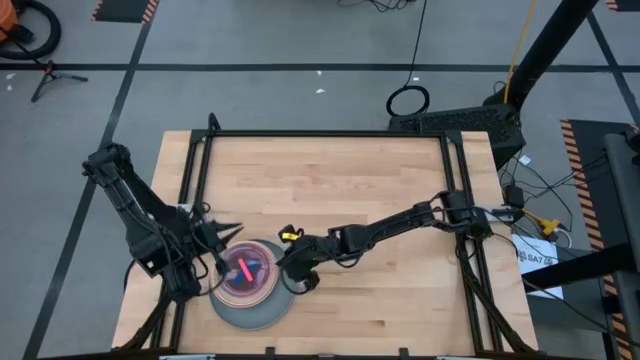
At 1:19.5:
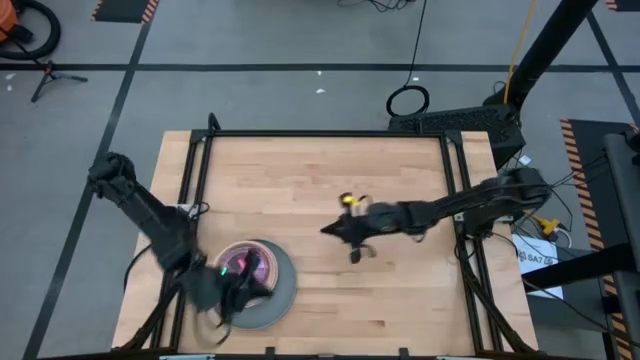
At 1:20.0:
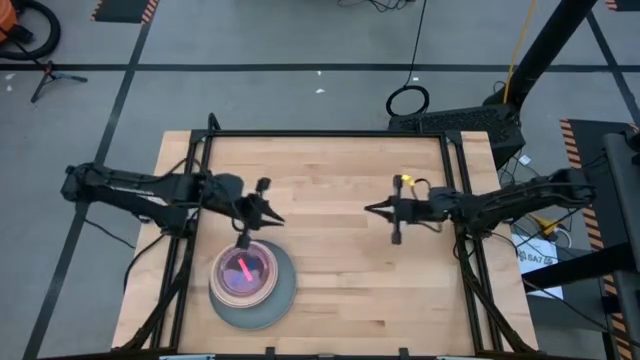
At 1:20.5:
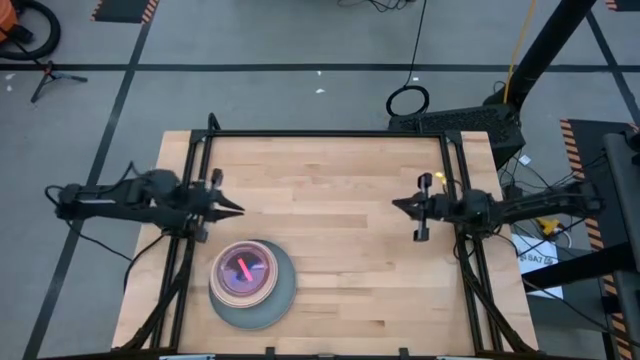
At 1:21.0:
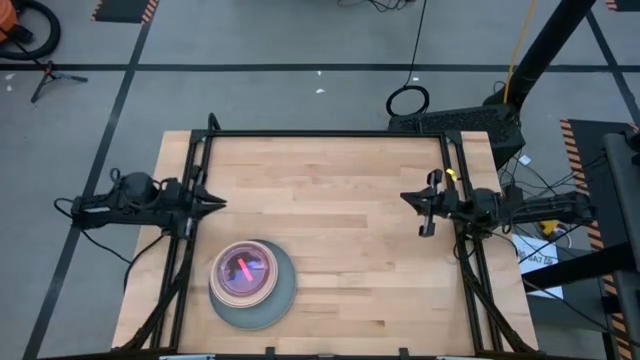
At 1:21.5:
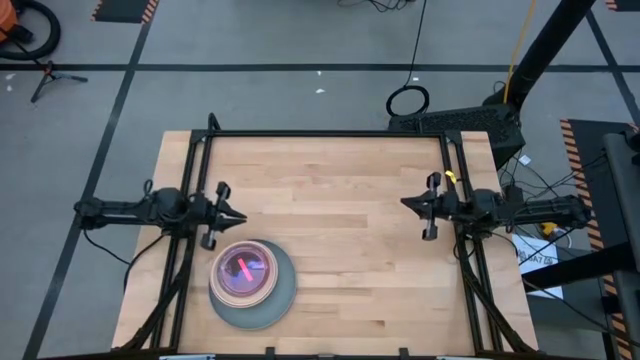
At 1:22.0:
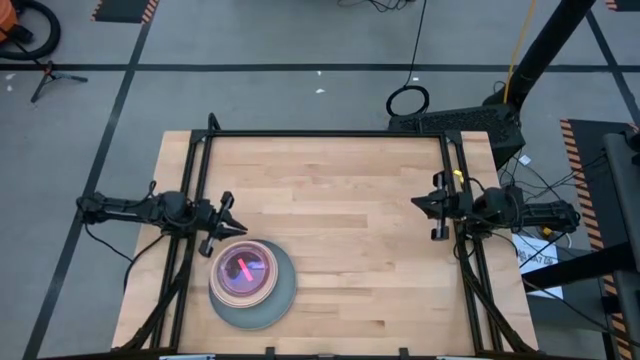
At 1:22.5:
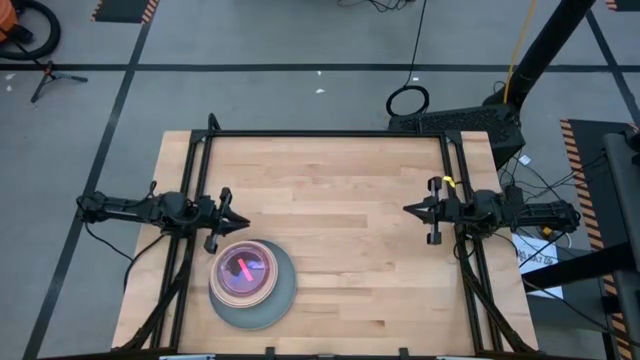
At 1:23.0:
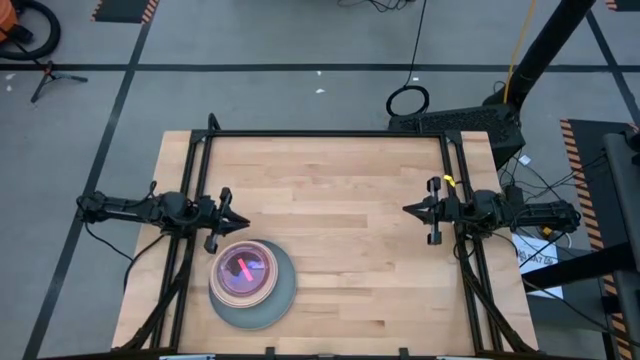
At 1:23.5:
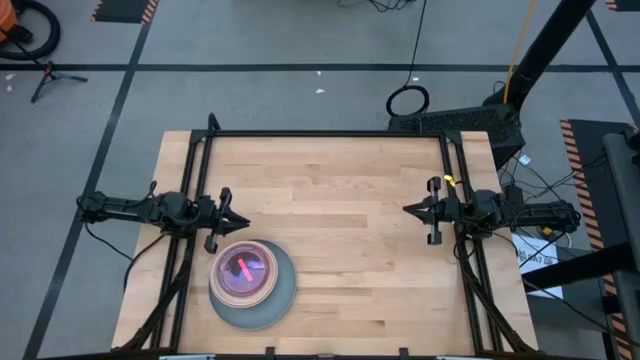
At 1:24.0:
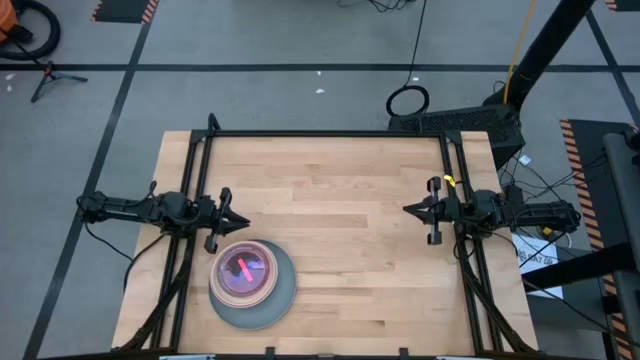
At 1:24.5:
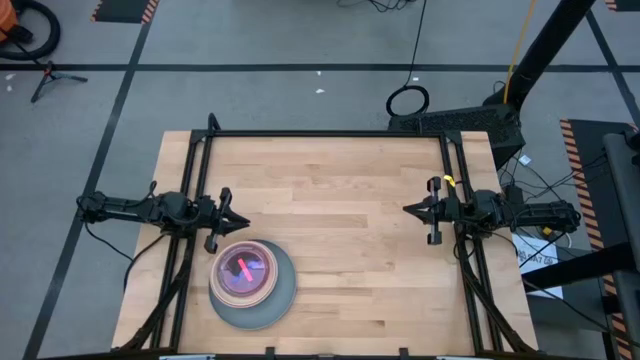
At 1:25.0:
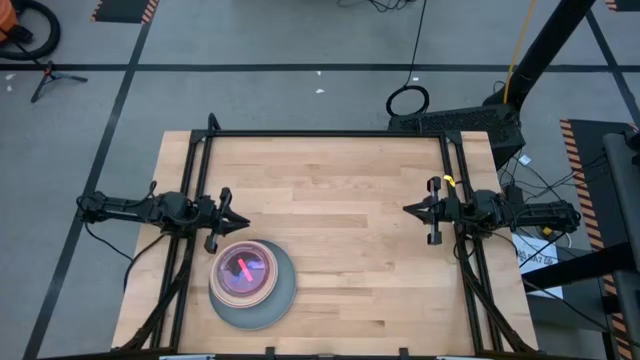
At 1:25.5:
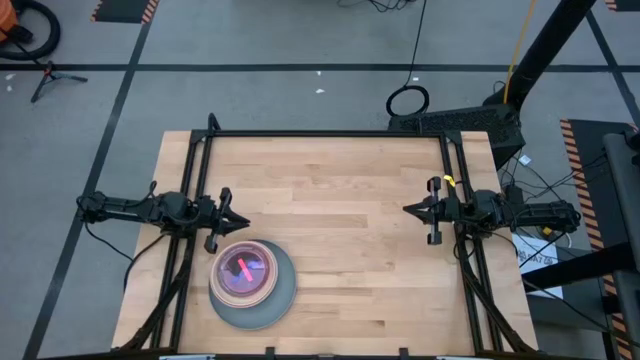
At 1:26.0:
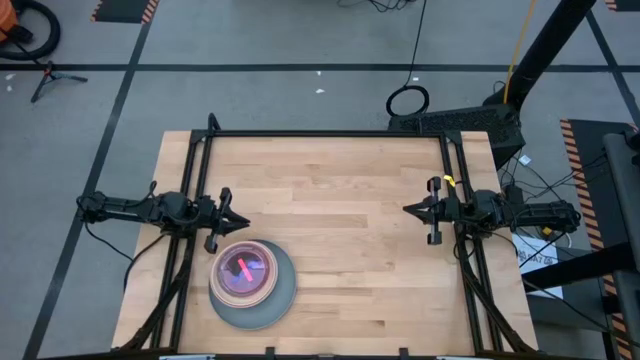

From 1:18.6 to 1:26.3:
Task: Stack plastic plates
Return to Home Position

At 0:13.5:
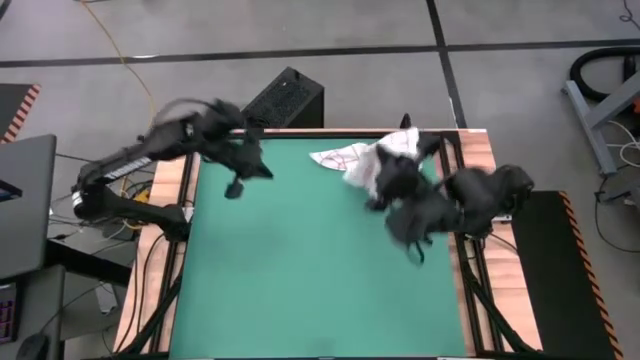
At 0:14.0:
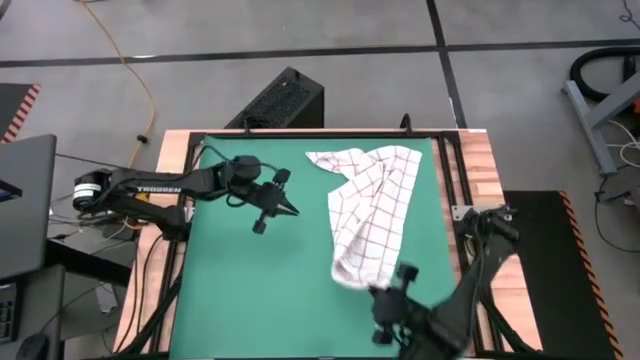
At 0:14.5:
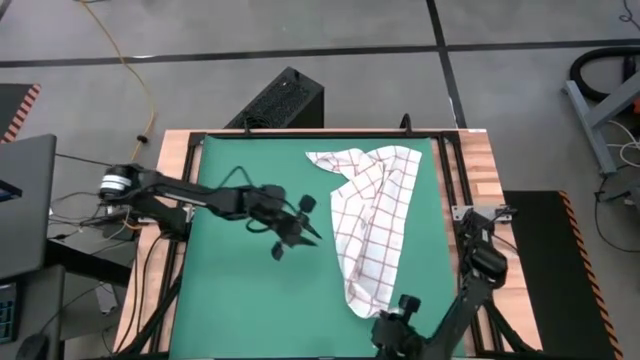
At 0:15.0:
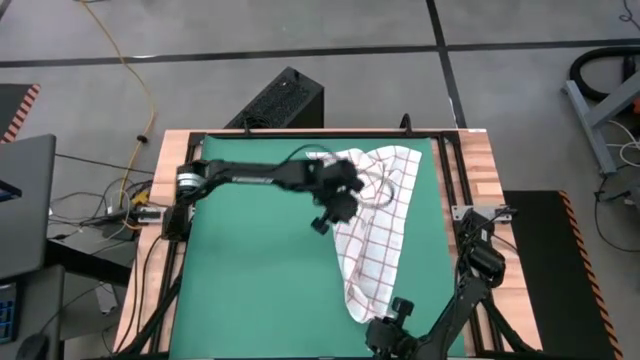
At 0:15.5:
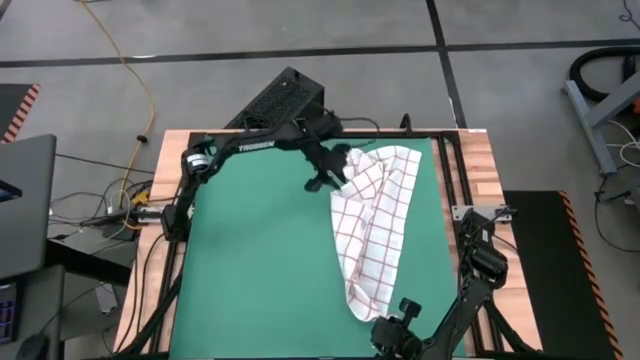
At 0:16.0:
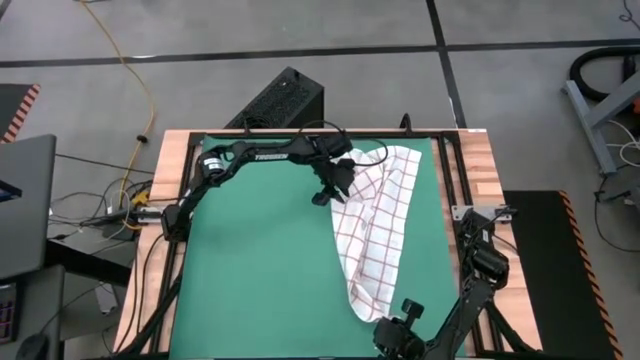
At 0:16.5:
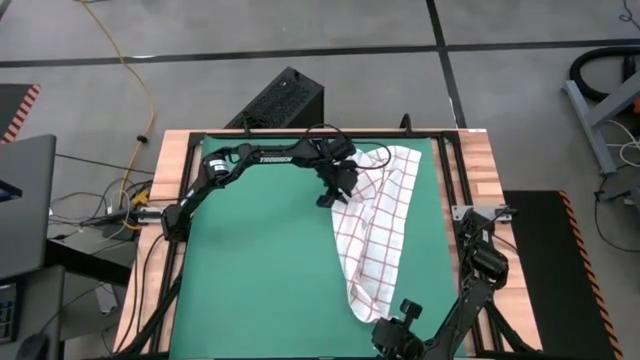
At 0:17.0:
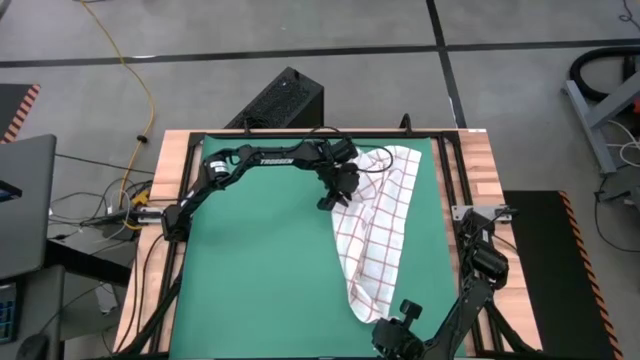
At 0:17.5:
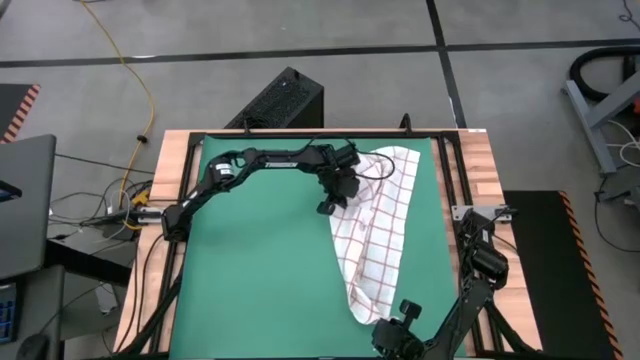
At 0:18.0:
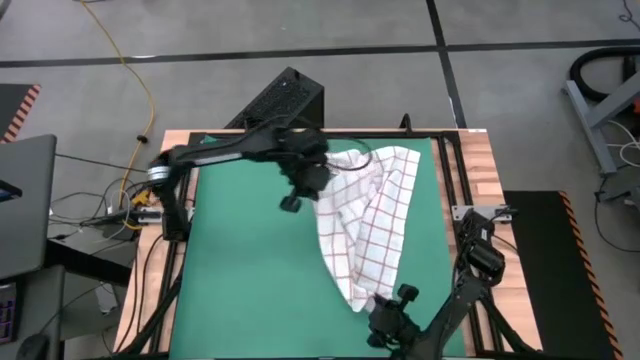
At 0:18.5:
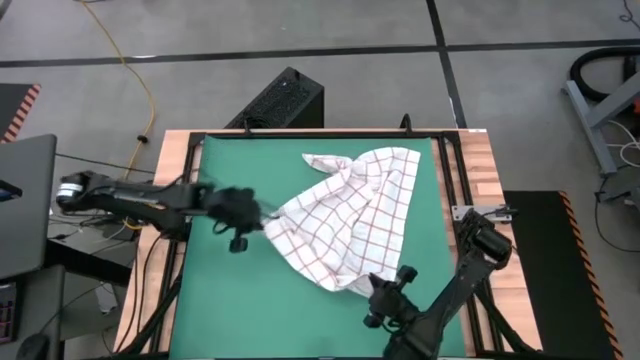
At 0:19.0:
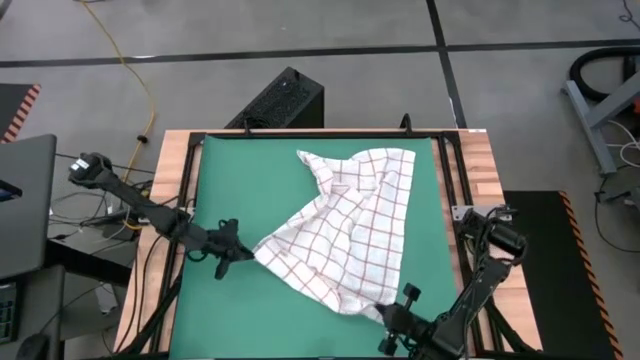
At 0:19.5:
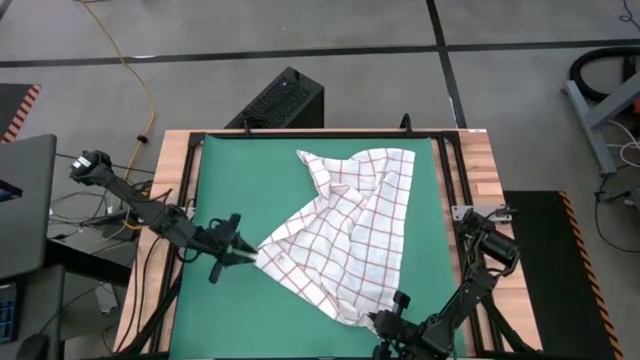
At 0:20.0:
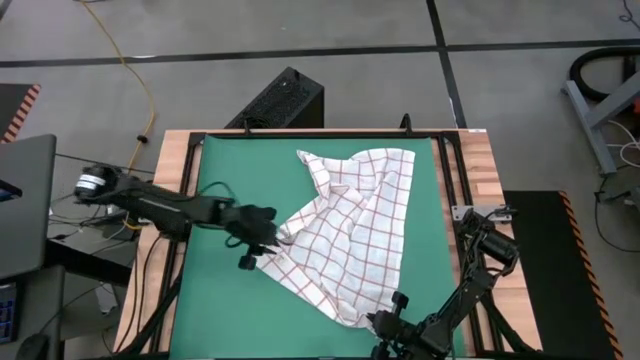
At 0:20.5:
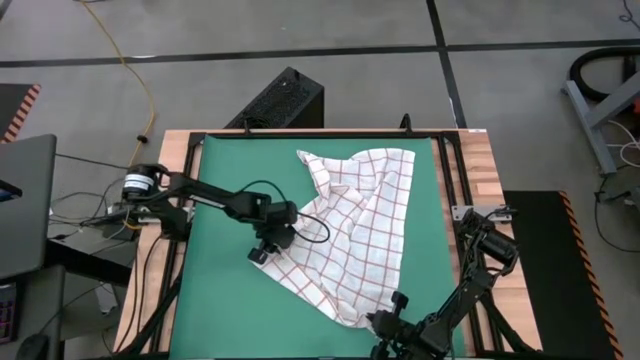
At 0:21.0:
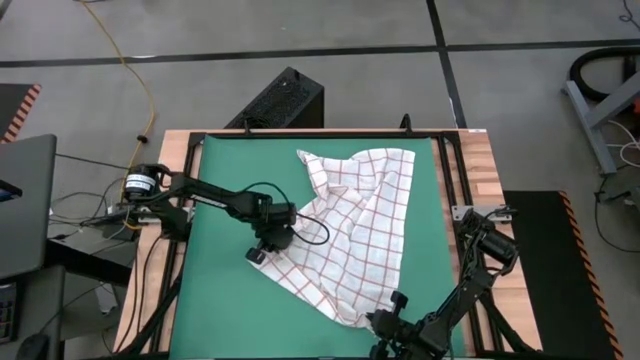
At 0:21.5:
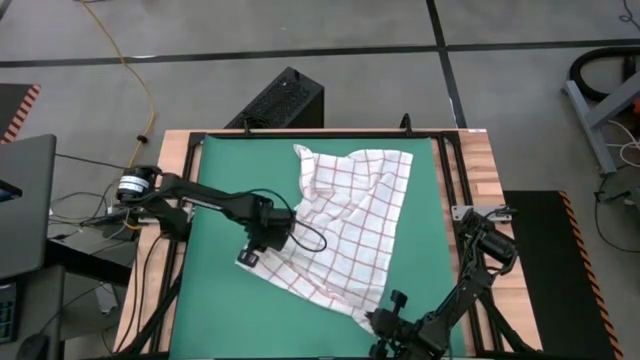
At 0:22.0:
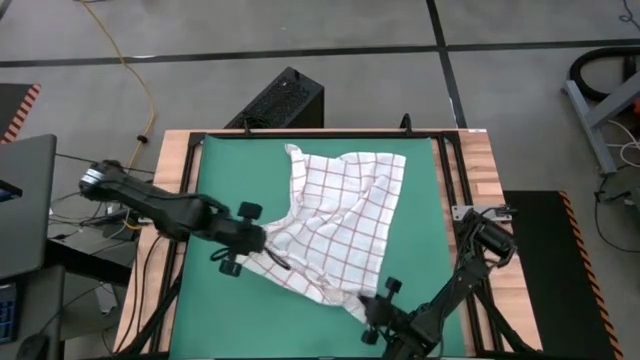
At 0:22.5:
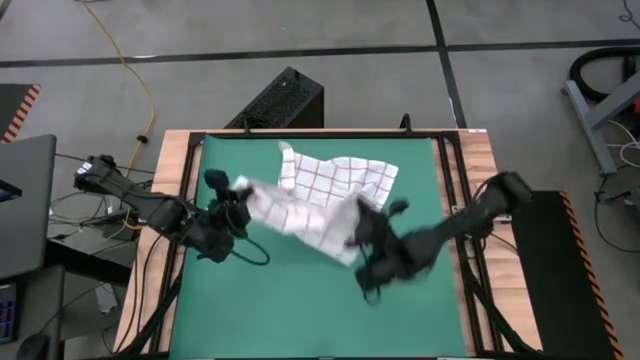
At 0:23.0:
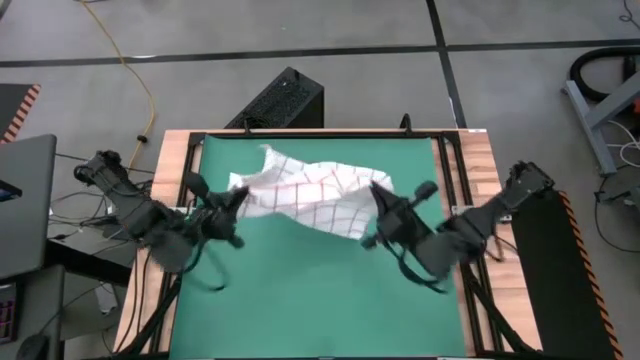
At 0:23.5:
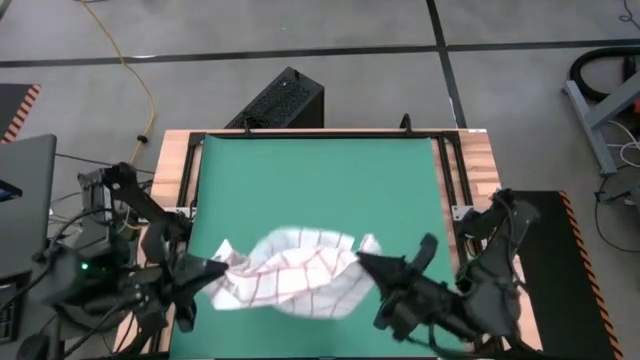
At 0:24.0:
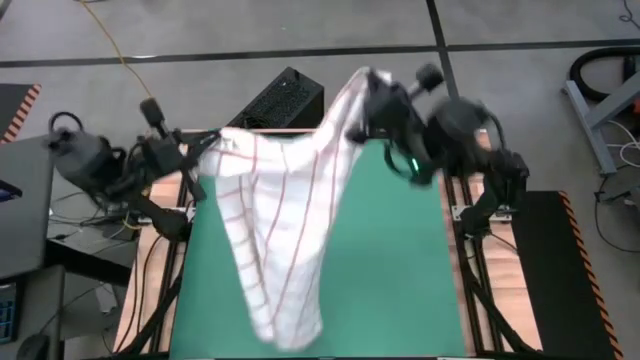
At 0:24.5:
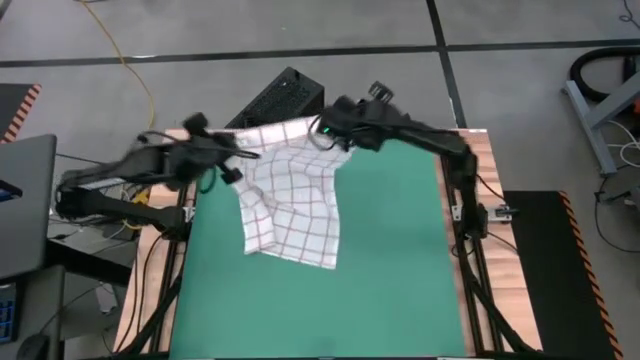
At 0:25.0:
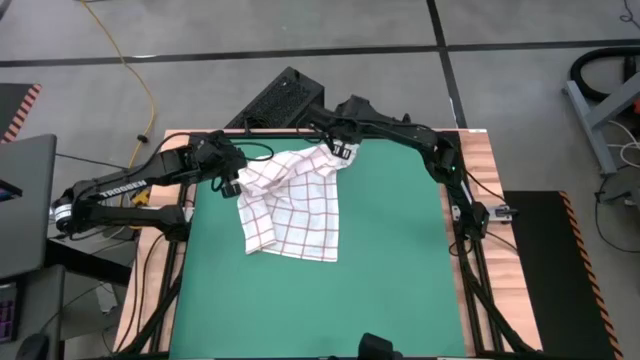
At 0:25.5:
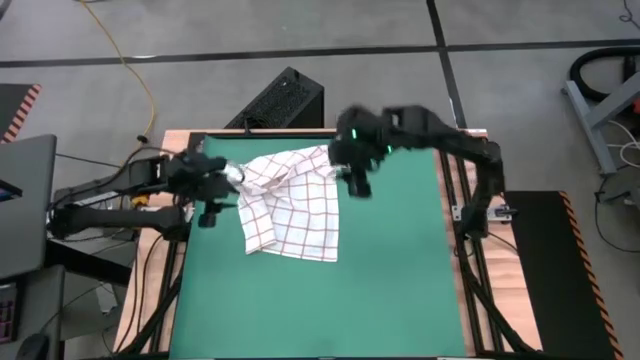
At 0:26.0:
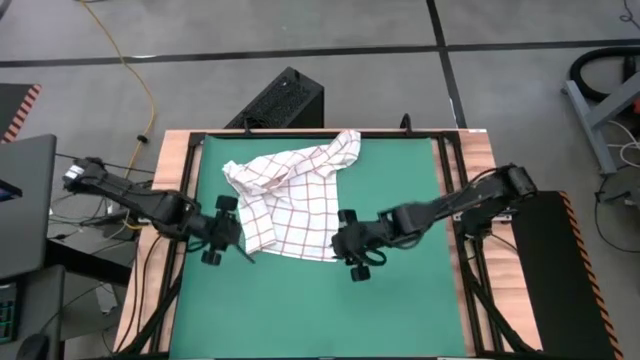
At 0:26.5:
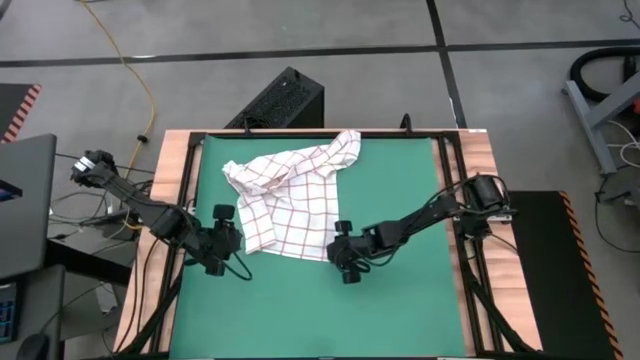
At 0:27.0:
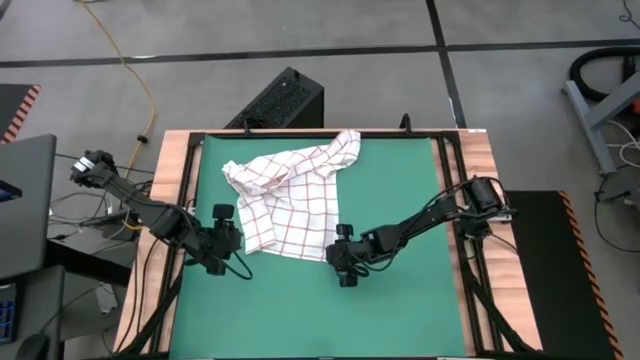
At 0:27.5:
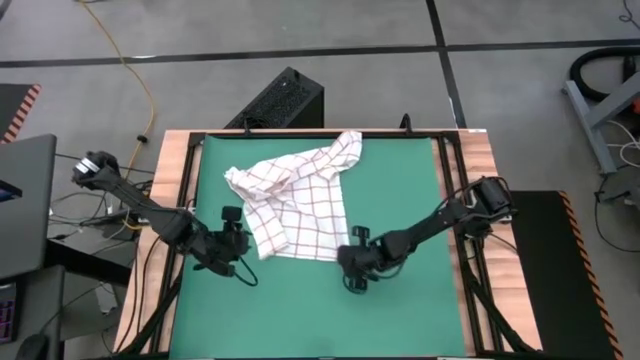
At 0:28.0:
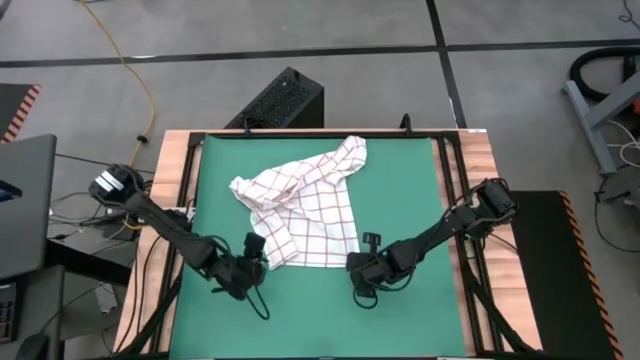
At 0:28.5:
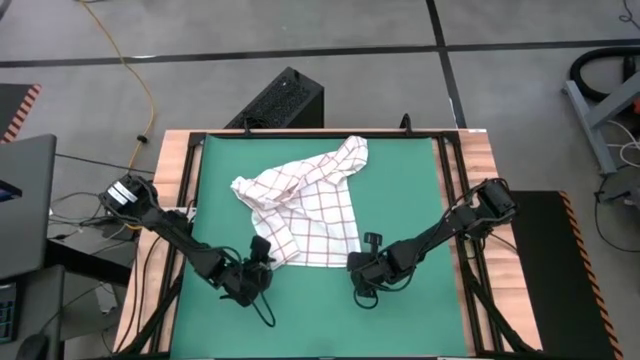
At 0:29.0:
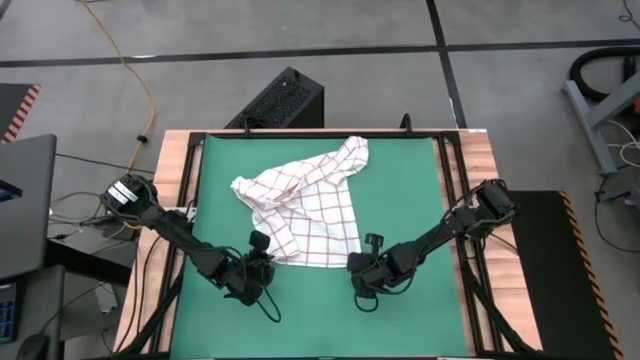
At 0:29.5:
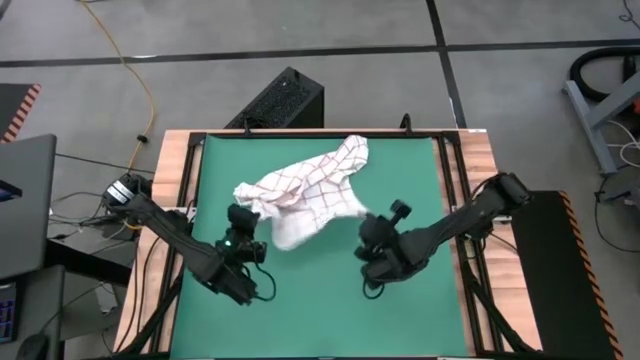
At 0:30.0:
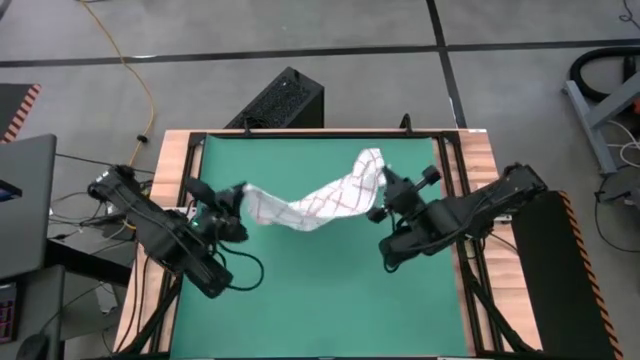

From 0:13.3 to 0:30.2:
Task: Roll towel into tight, uniform cylinder
Fold the white towel
